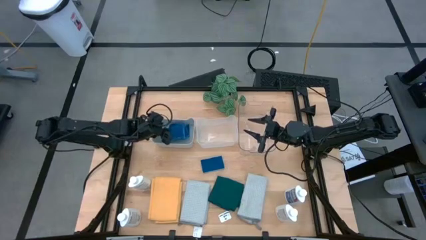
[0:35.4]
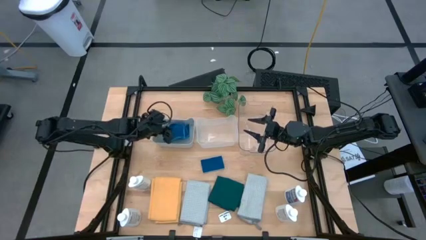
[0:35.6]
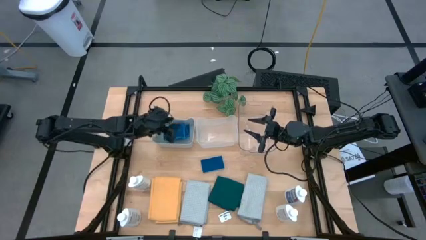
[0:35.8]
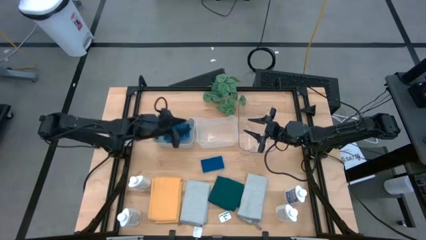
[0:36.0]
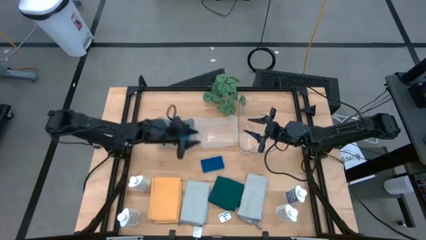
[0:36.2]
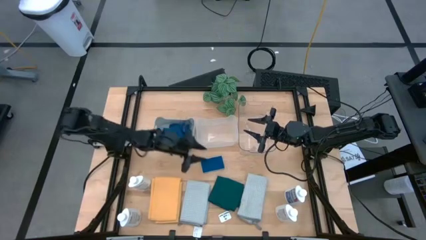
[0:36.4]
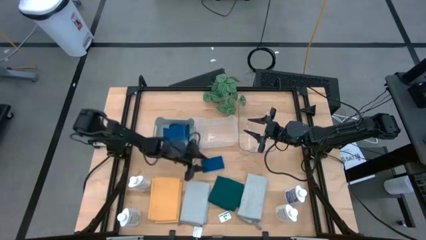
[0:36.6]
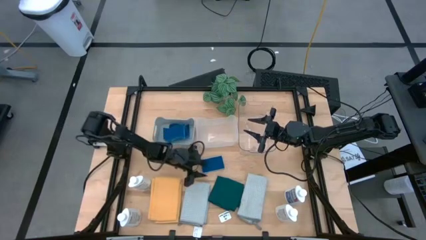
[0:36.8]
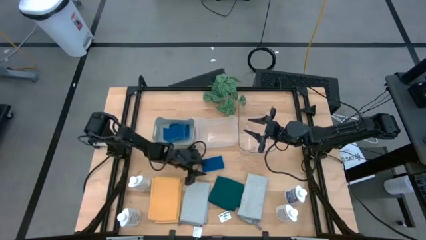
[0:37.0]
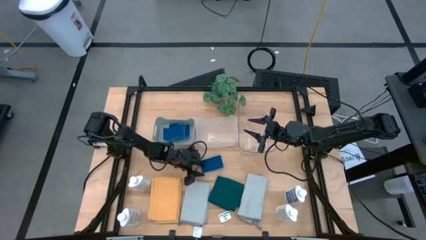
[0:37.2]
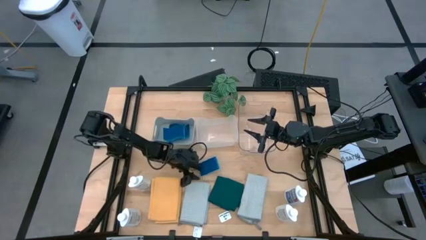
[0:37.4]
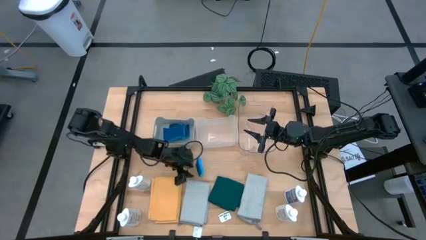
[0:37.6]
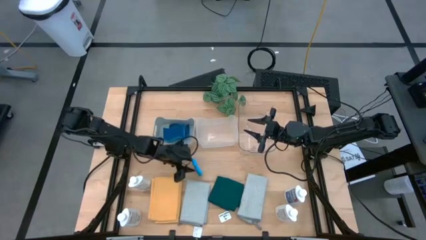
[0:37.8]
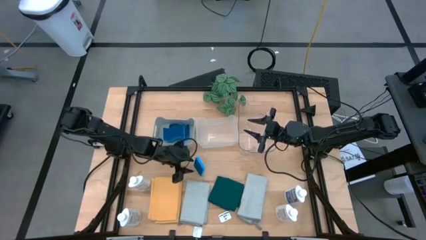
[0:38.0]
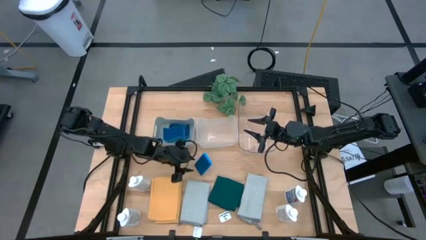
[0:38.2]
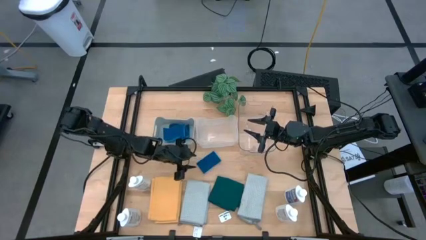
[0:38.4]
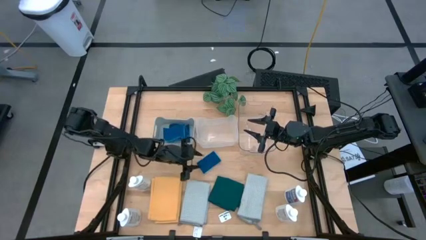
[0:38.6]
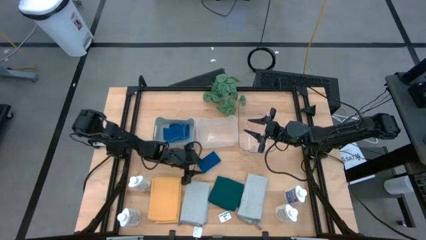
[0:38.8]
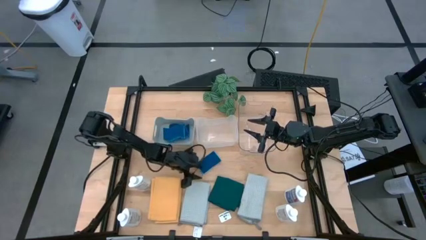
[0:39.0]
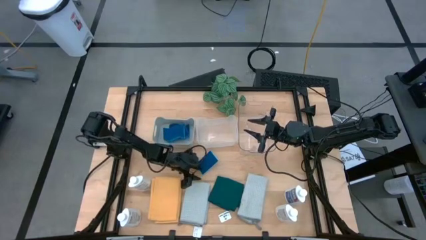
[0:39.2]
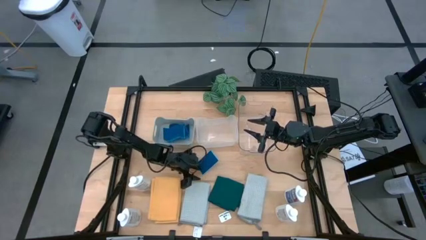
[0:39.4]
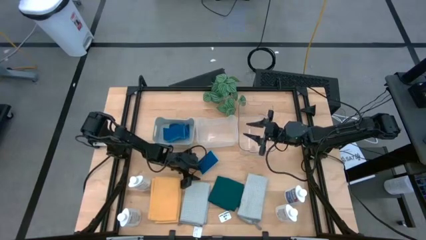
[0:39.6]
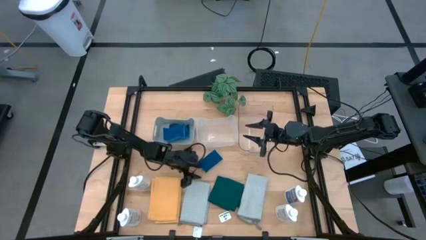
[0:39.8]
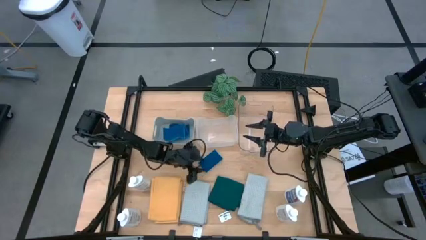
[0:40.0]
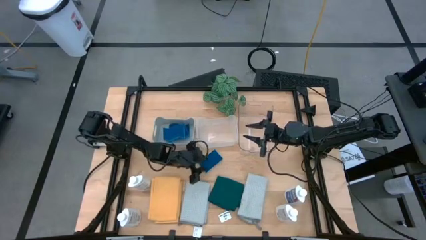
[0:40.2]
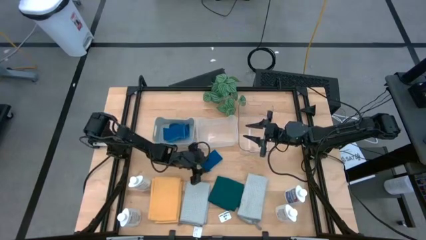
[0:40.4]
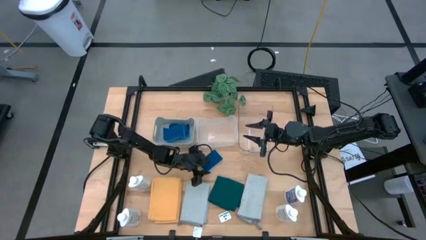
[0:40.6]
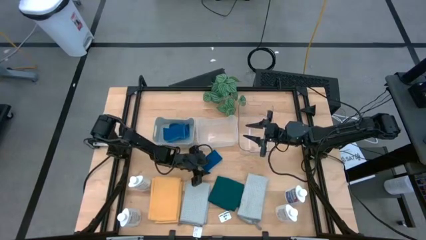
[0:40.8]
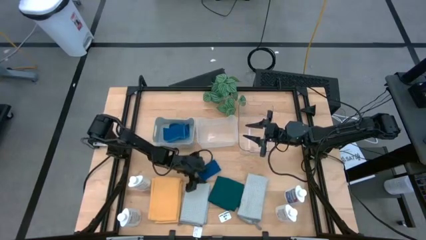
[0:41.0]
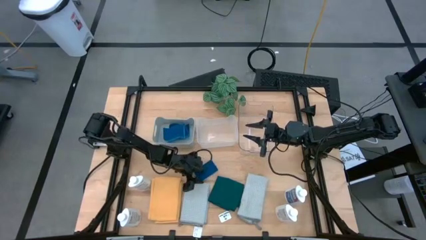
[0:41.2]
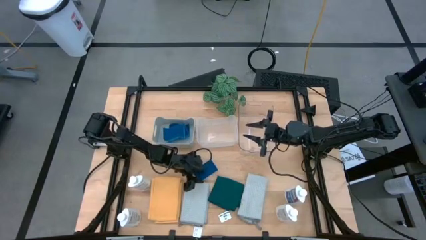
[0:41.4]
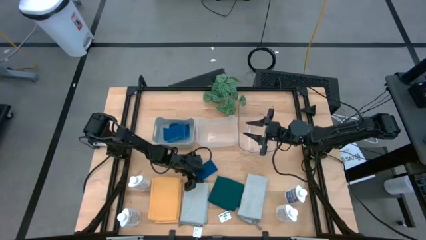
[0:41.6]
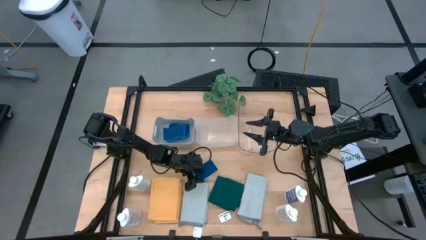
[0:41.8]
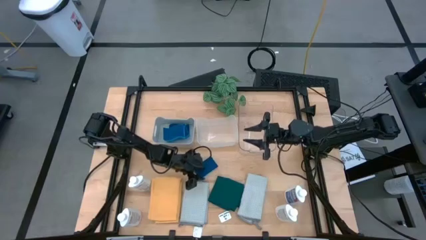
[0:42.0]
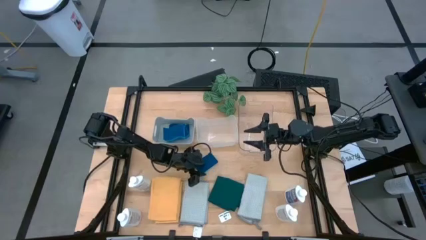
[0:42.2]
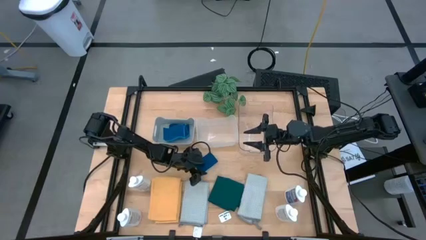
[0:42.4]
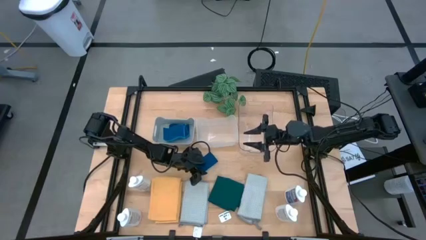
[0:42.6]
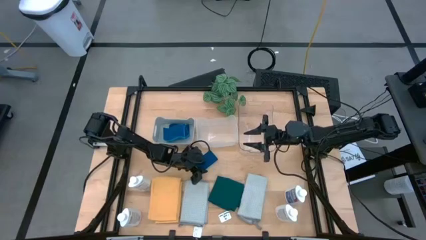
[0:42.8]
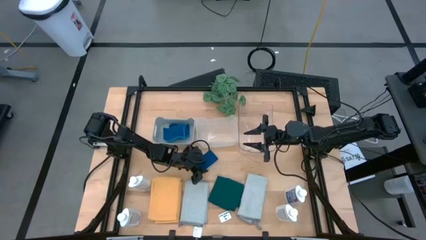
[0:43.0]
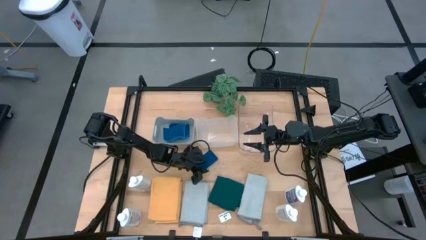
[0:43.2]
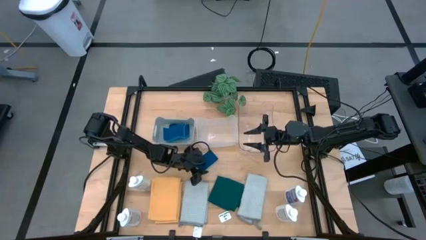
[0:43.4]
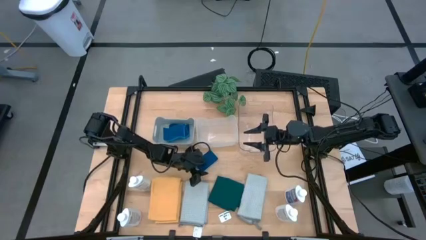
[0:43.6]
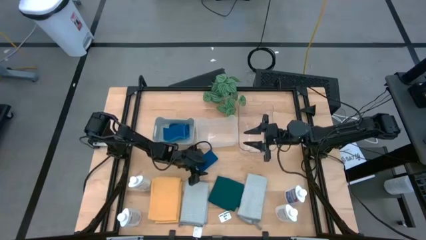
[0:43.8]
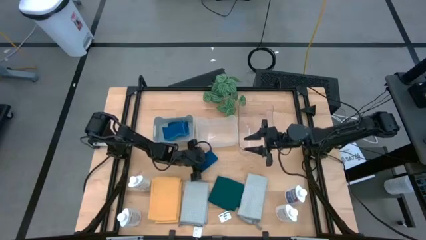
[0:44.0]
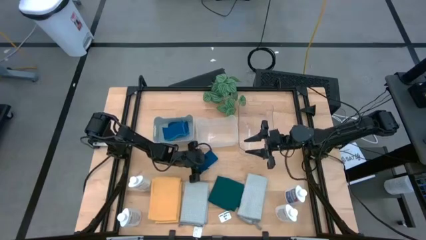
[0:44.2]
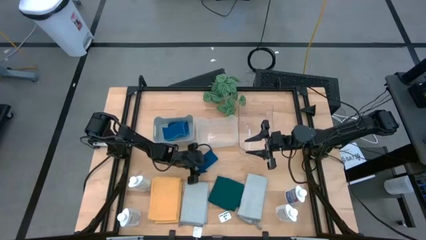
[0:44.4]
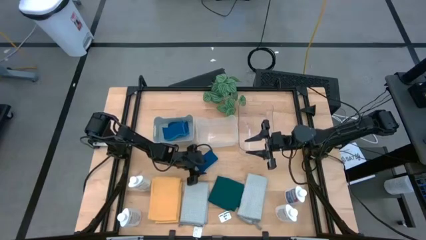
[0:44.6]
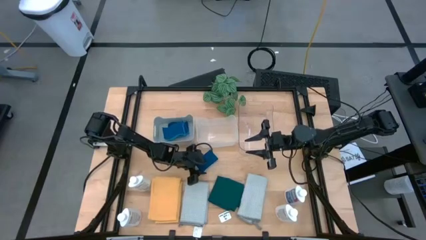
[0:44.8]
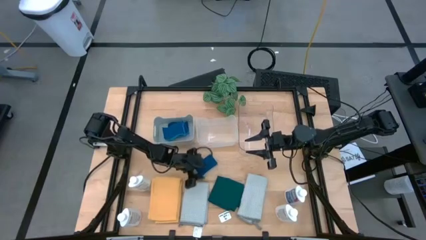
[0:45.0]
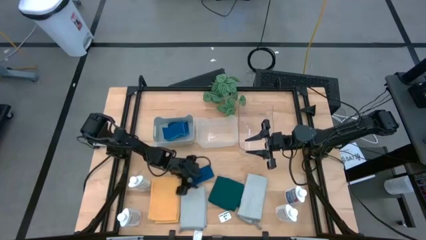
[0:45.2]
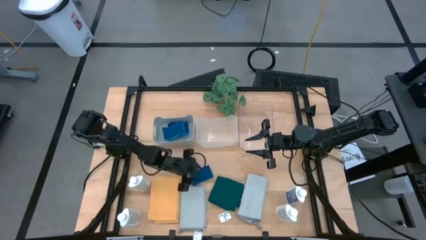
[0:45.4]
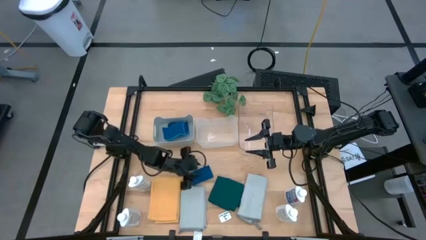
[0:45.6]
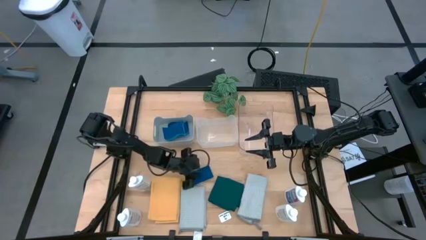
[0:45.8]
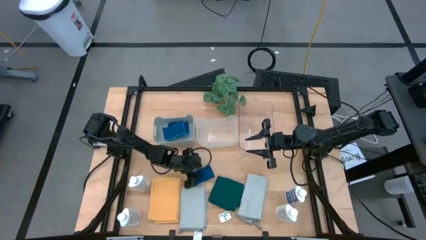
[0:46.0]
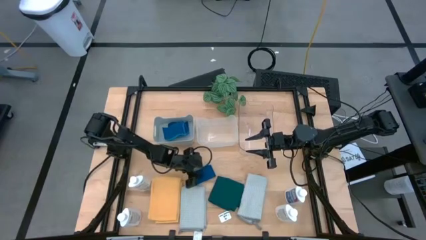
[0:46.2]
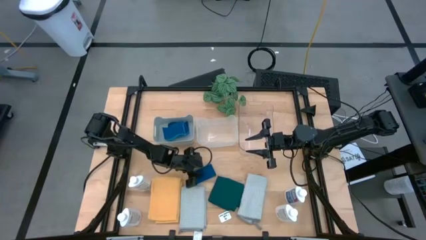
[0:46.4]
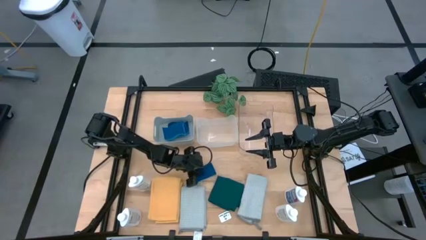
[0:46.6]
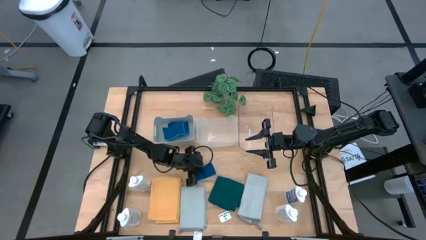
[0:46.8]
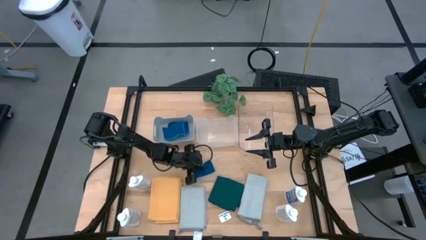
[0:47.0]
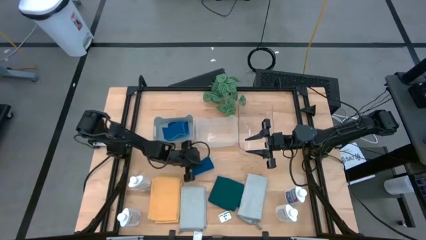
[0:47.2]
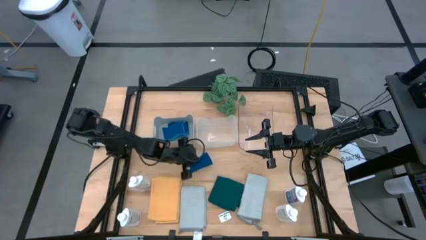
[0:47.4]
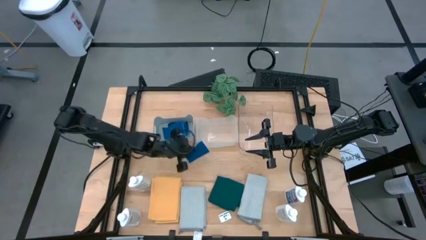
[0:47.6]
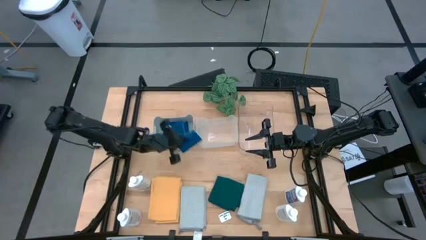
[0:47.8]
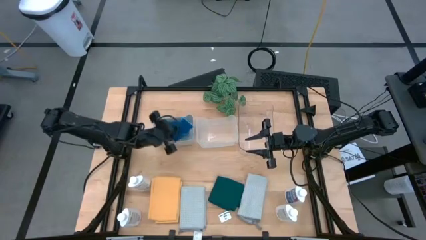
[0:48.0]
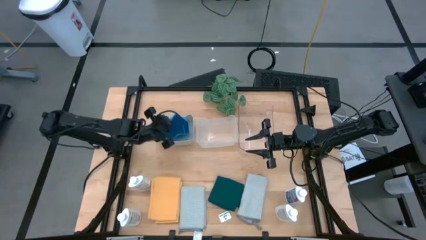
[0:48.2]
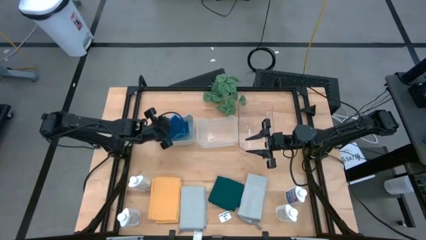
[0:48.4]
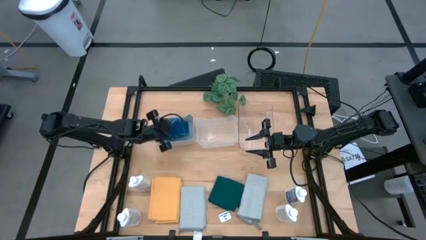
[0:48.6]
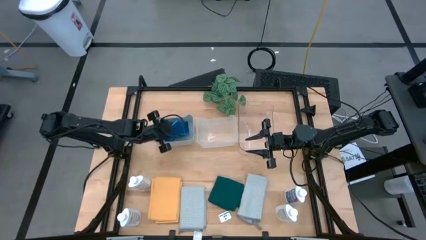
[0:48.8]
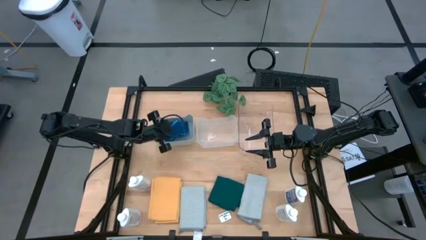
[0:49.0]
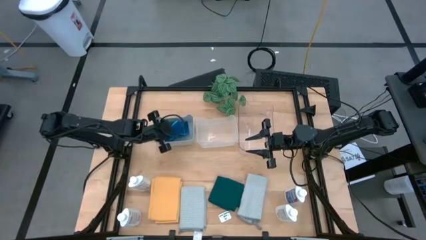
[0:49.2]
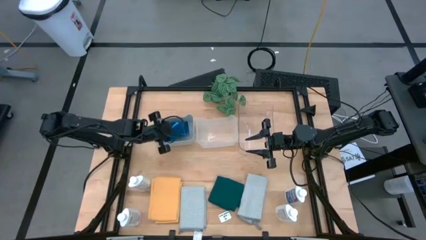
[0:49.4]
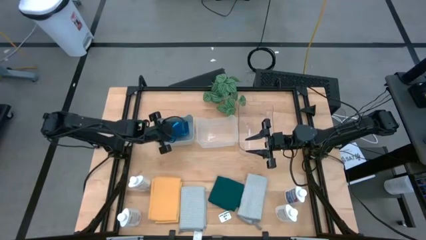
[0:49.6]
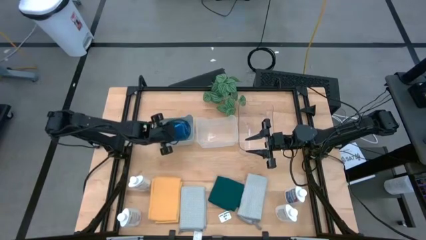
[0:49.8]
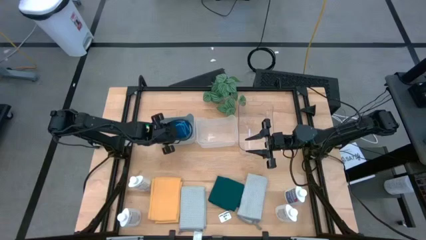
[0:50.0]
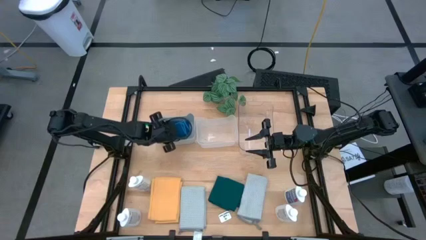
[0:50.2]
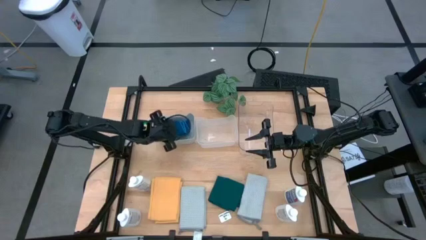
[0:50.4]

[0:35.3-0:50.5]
Task: Pick & Place Kitchen Items
Put the blue sponge into the gray bin
